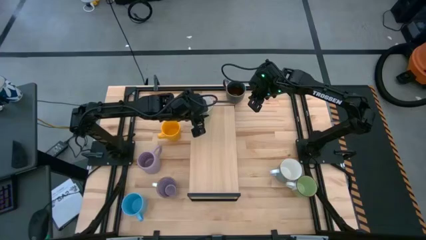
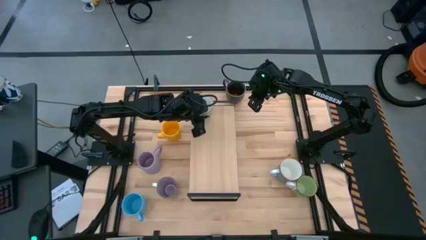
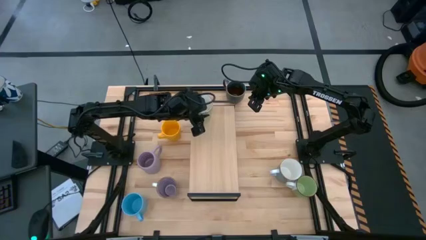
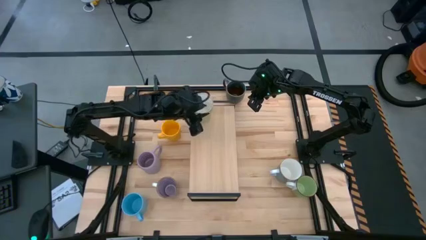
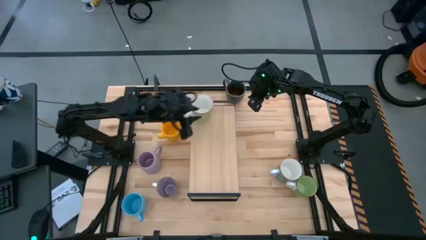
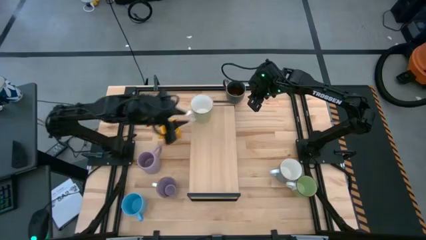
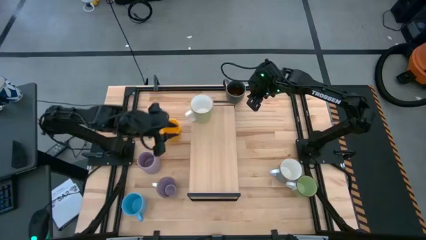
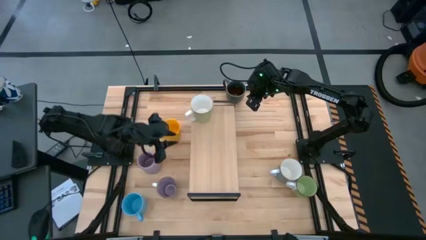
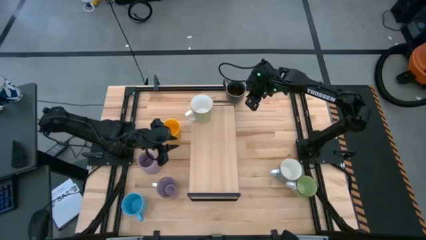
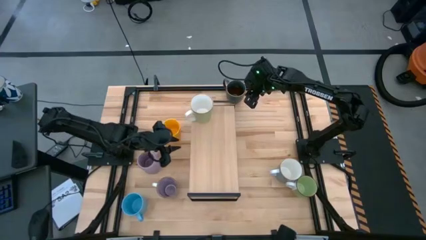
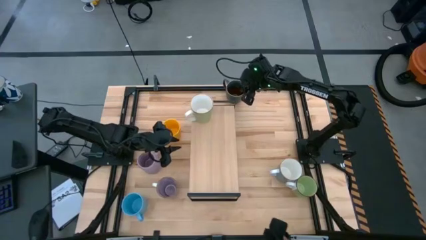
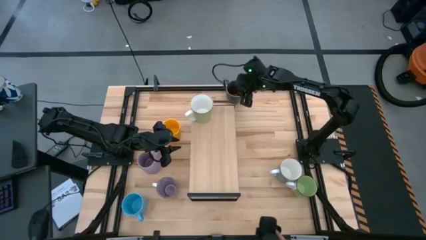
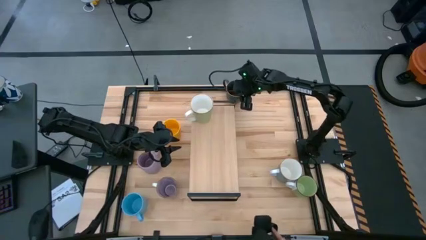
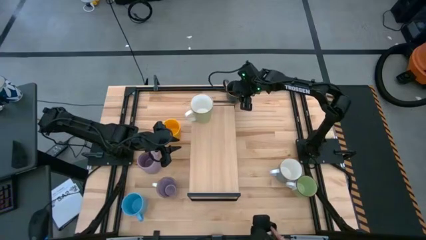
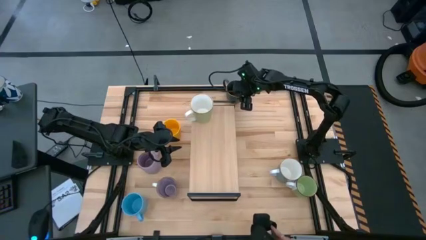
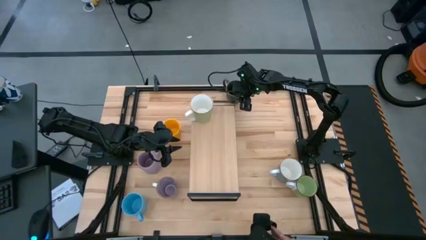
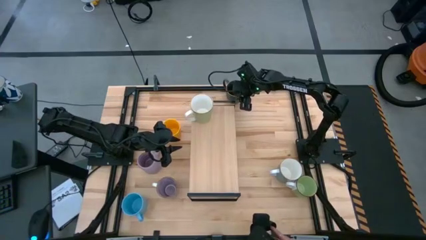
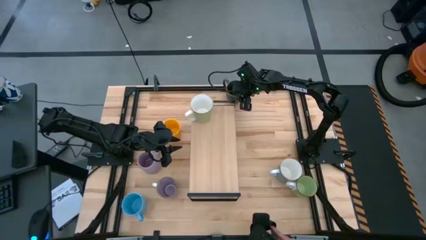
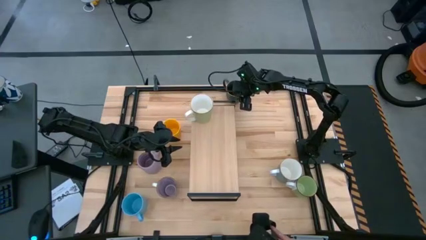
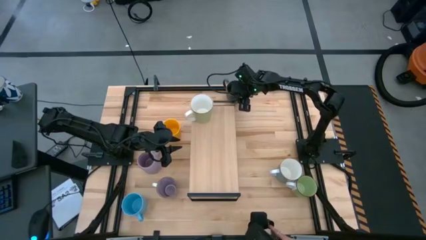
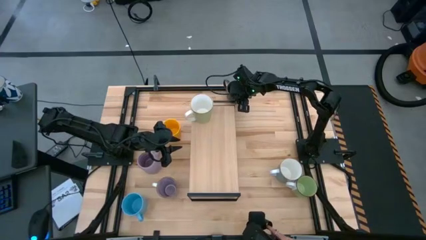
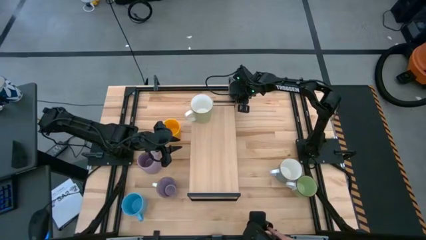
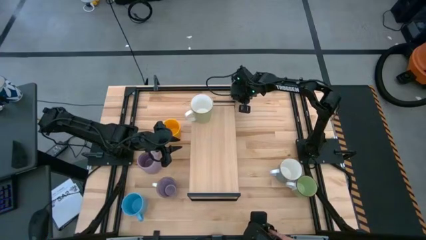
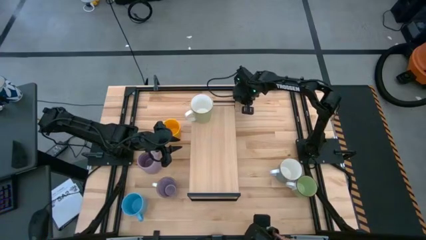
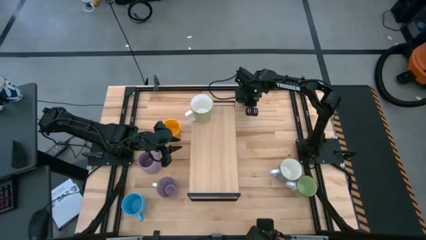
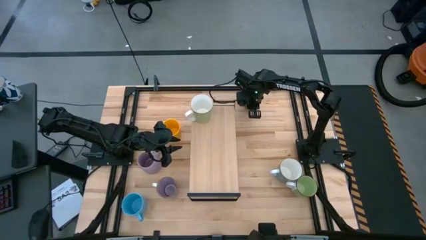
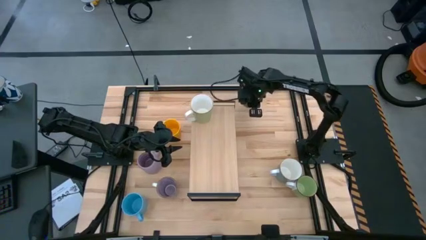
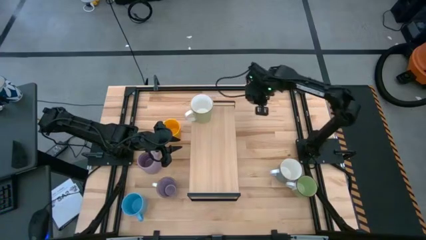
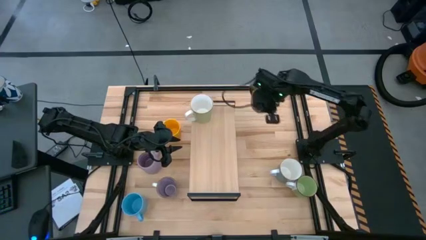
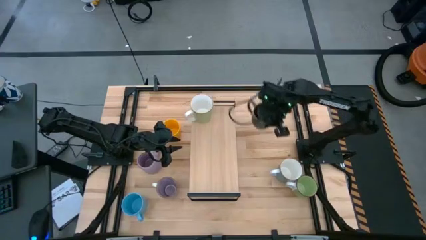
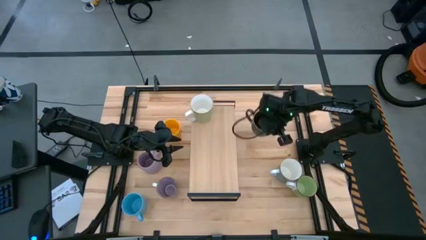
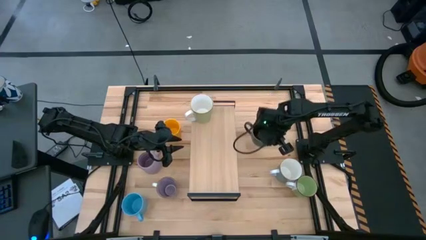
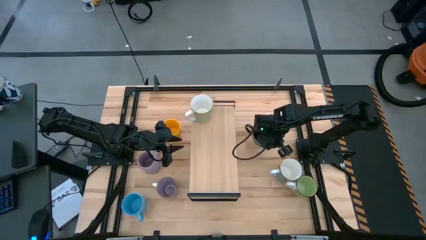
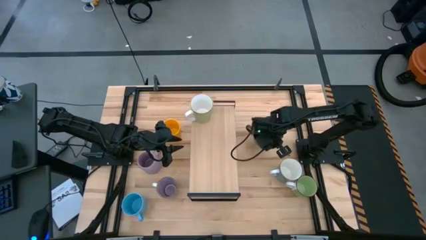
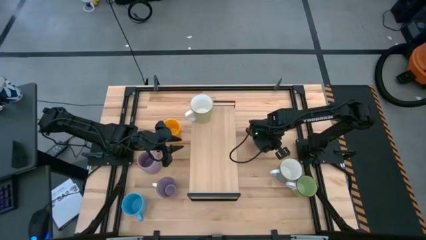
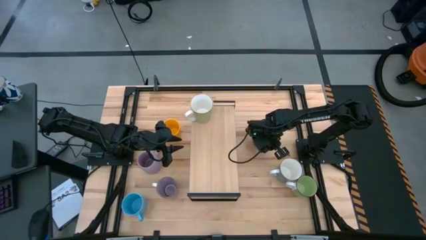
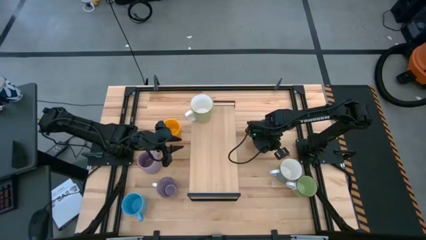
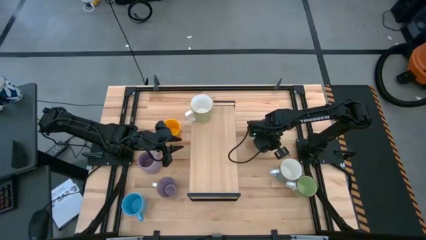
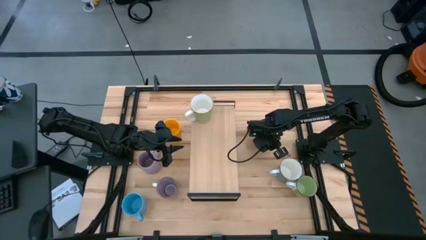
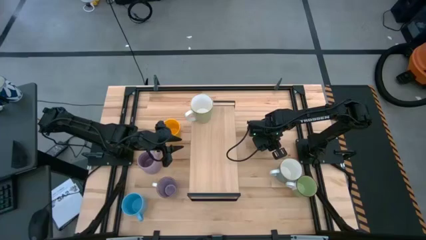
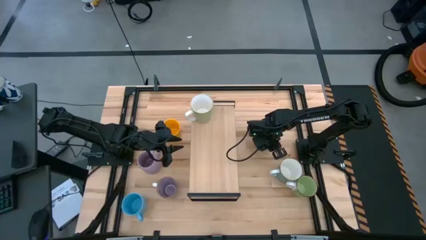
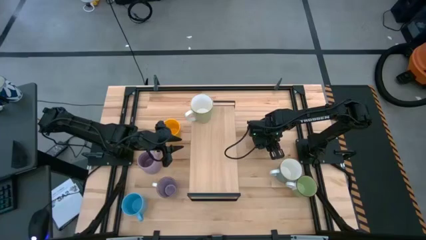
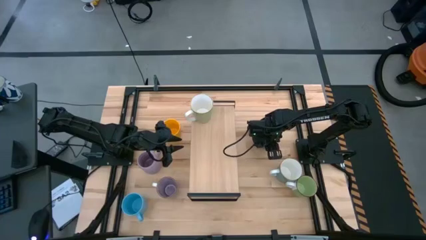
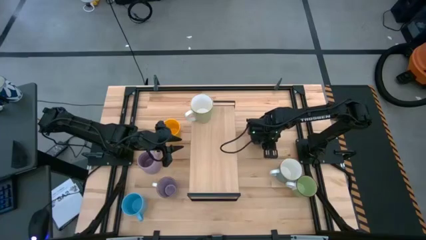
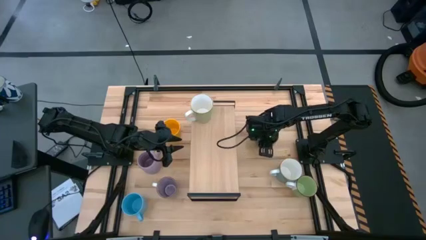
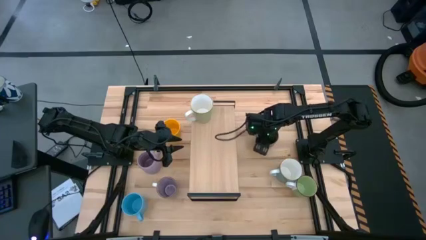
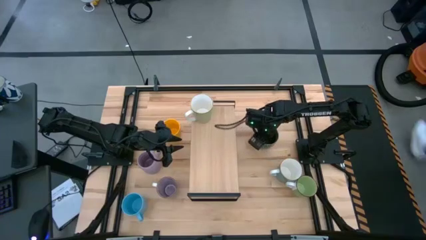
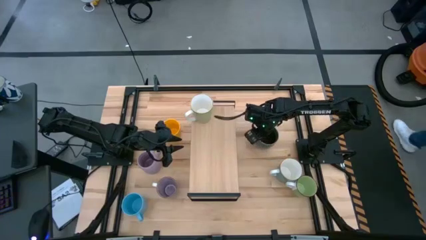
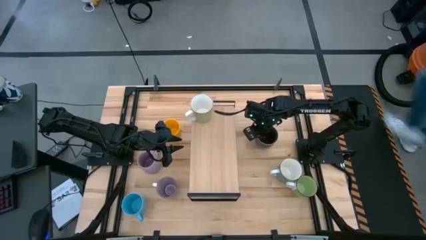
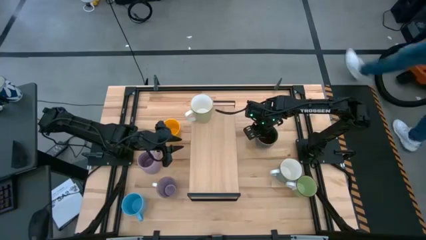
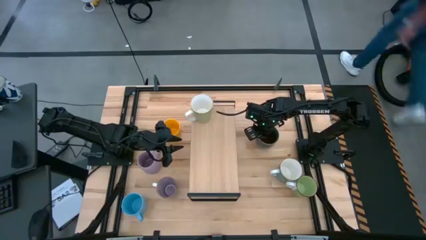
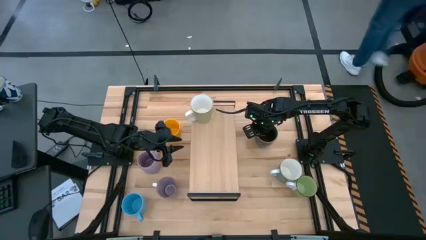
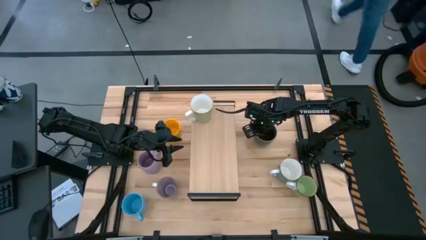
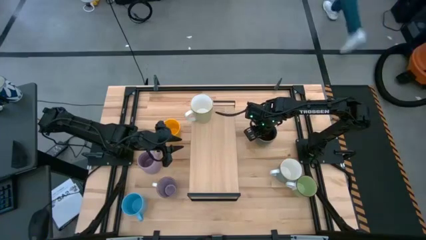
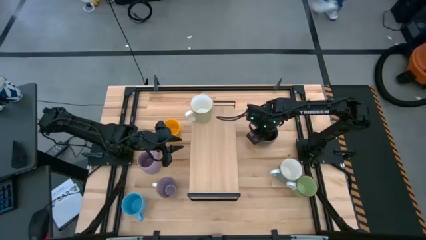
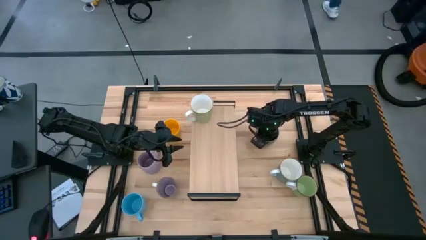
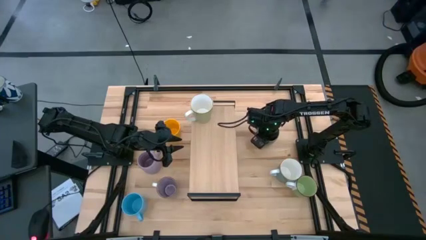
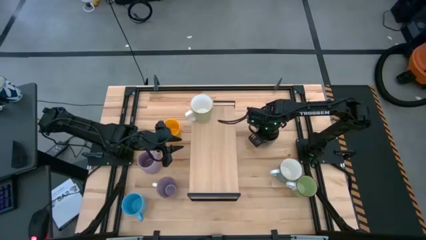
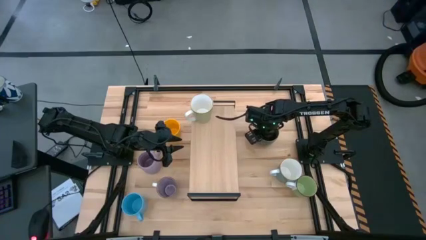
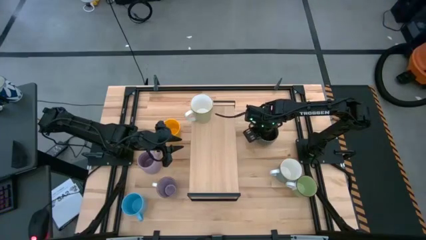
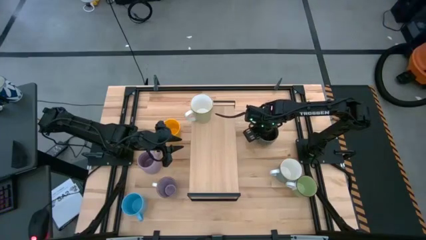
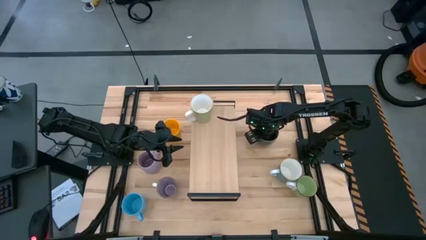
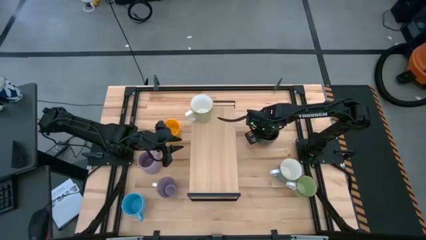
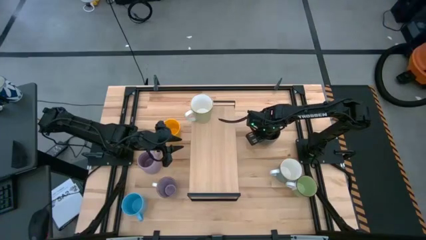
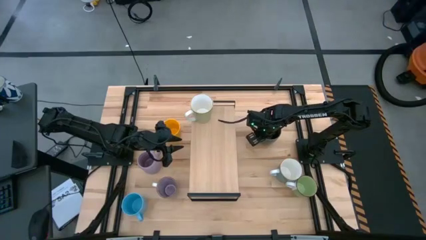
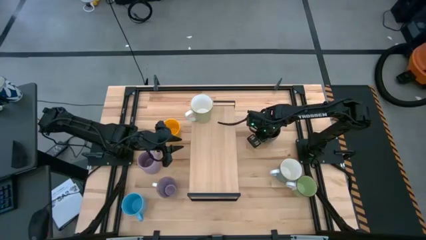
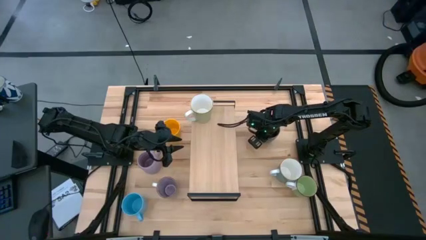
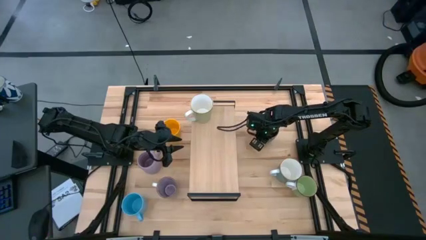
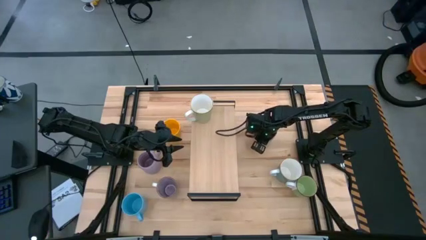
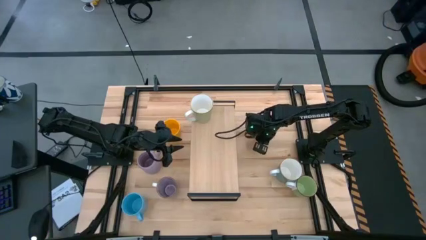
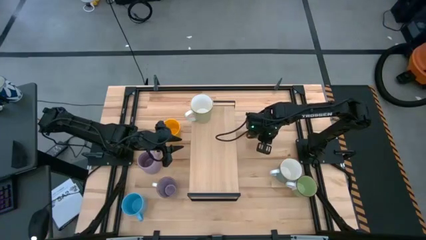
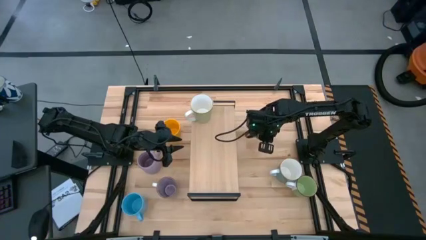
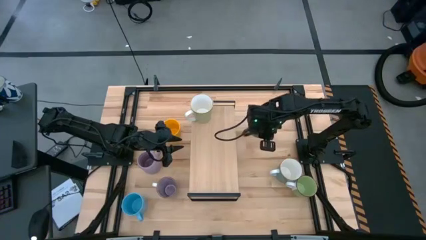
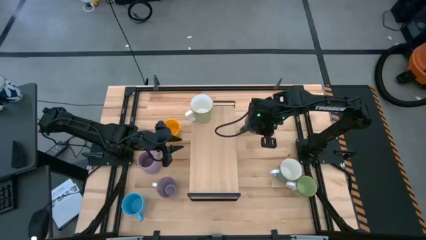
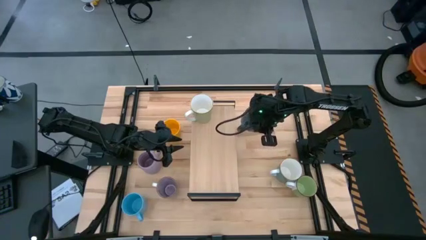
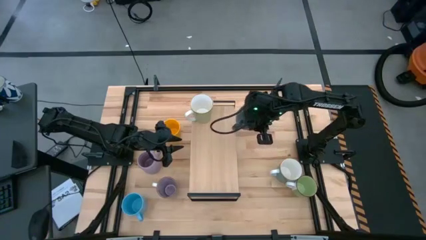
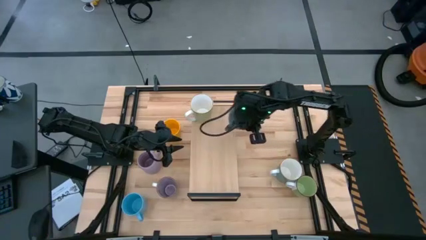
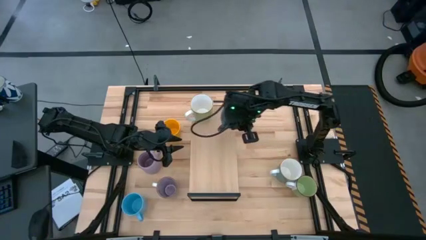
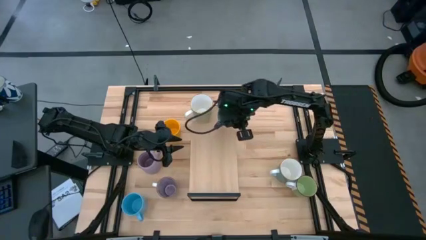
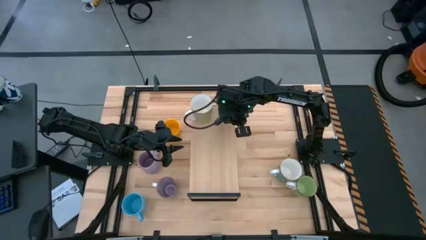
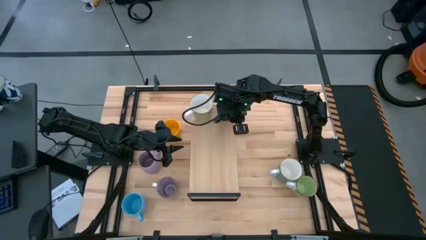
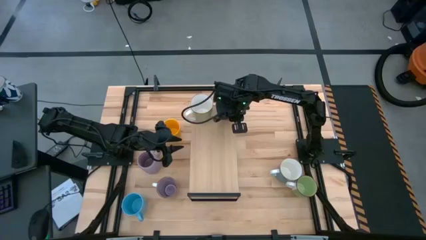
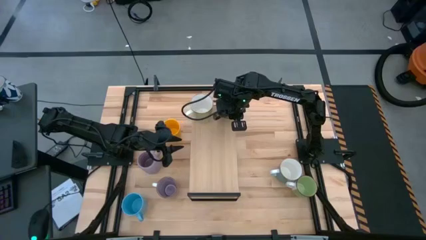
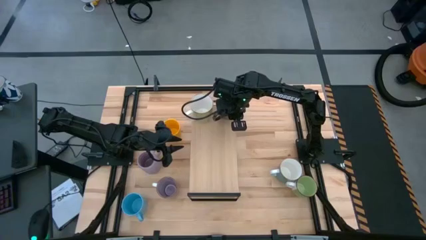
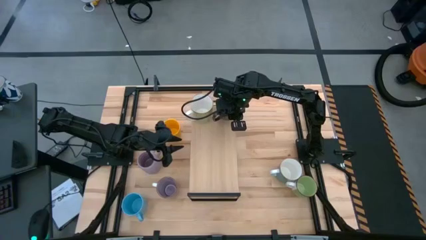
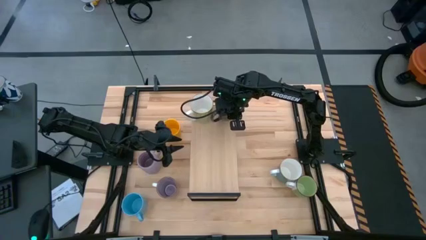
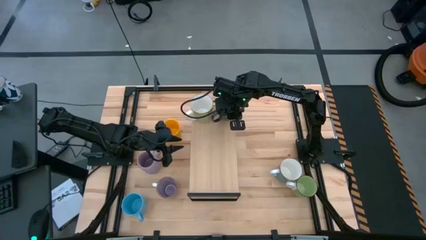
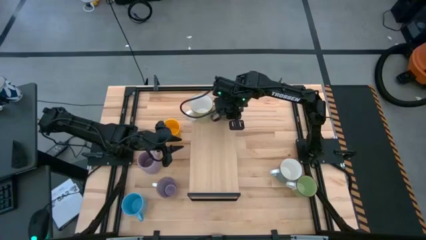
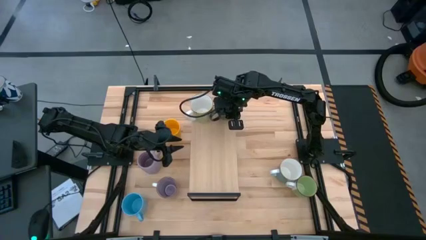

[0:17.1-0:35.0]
Task: Place coffee mugs
Put the brown mug on the shelf
